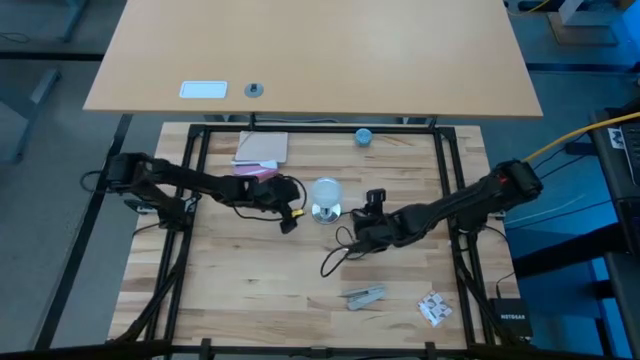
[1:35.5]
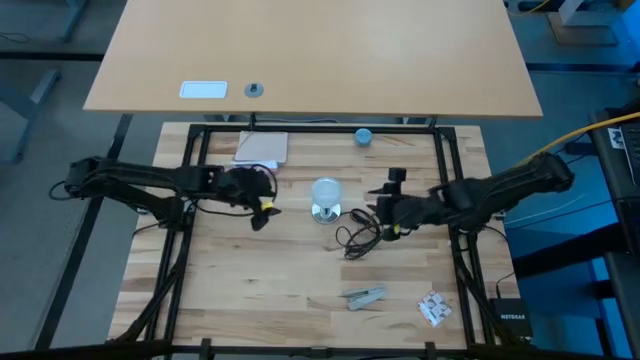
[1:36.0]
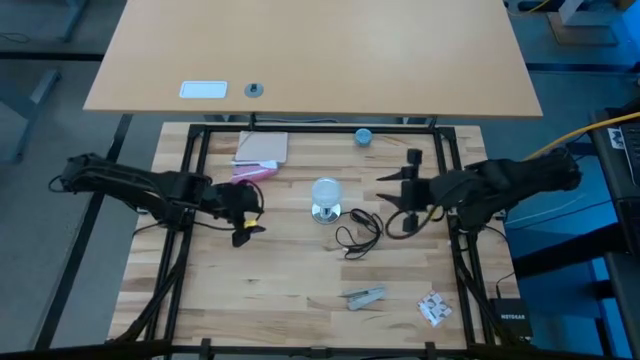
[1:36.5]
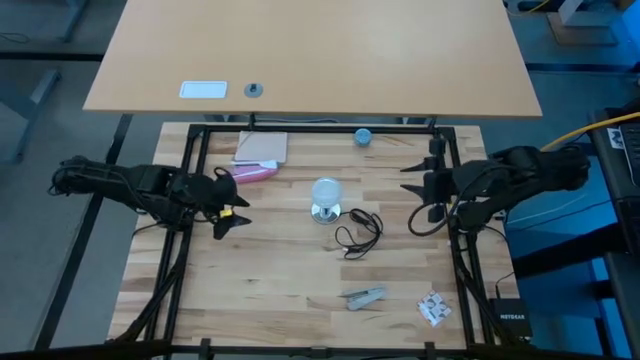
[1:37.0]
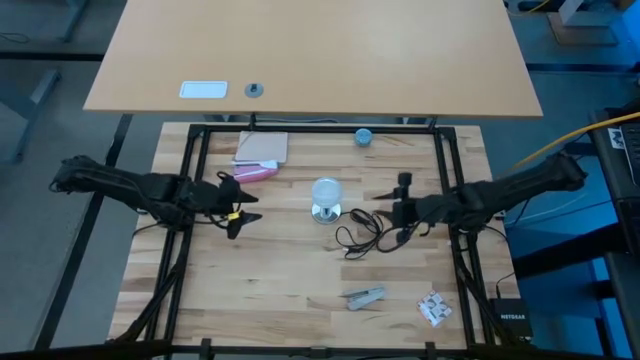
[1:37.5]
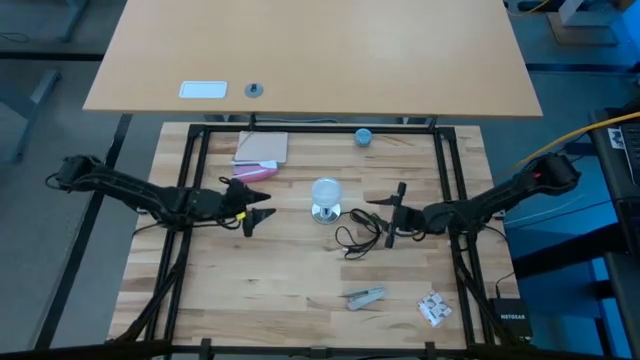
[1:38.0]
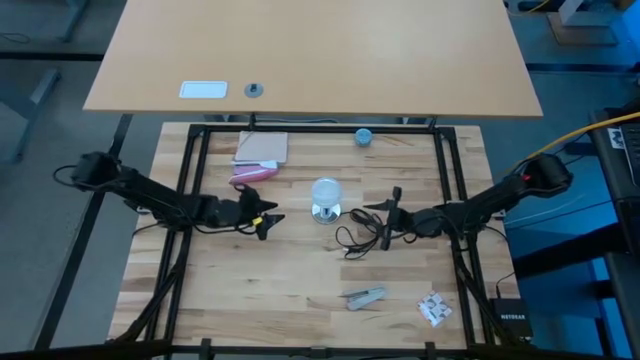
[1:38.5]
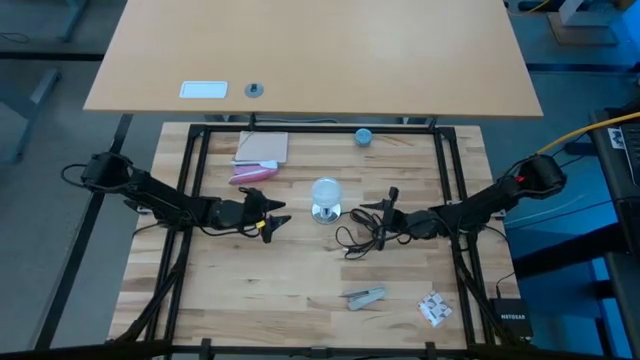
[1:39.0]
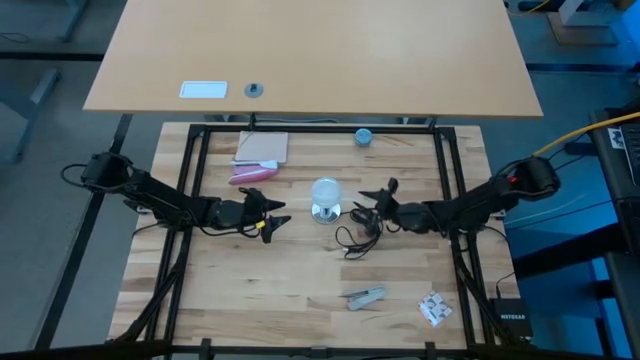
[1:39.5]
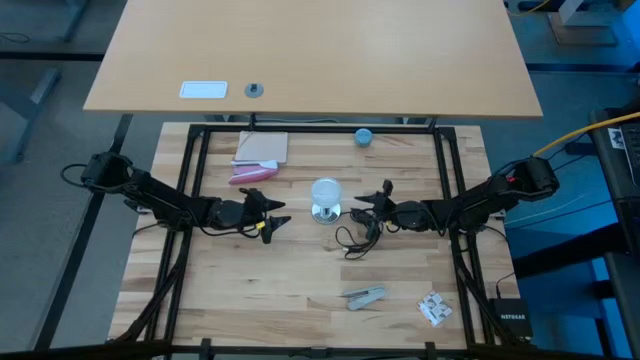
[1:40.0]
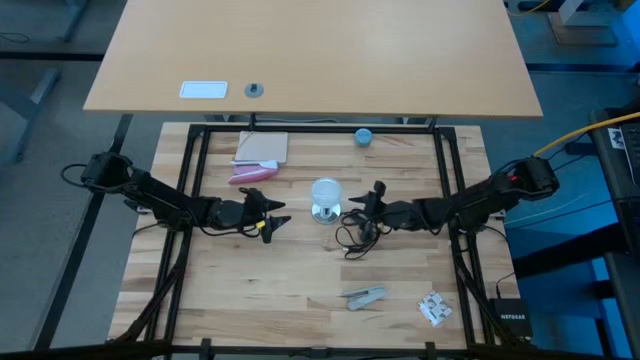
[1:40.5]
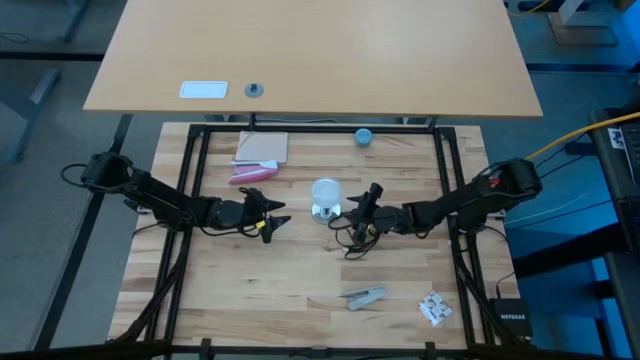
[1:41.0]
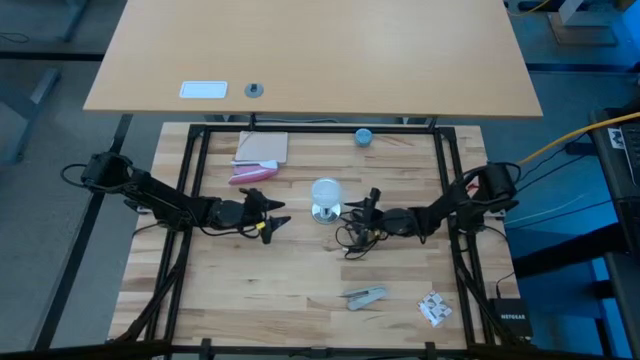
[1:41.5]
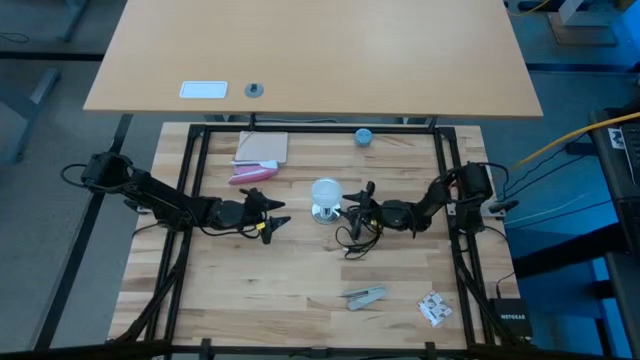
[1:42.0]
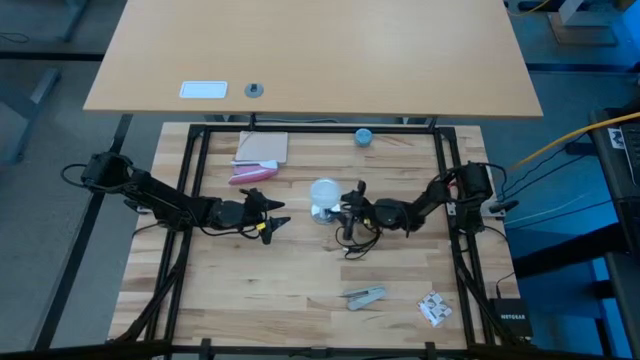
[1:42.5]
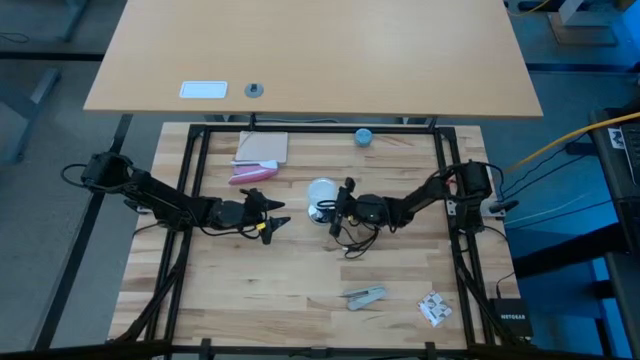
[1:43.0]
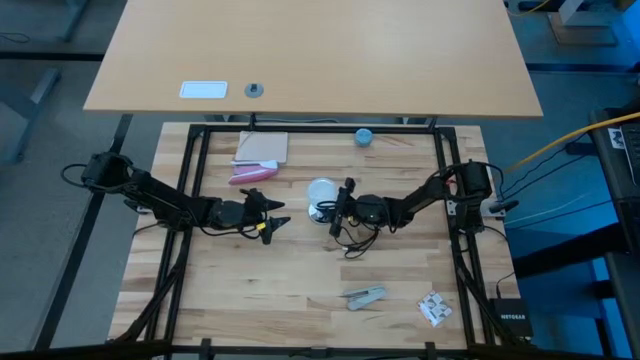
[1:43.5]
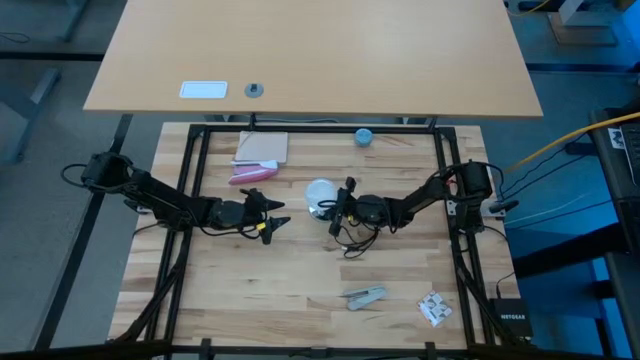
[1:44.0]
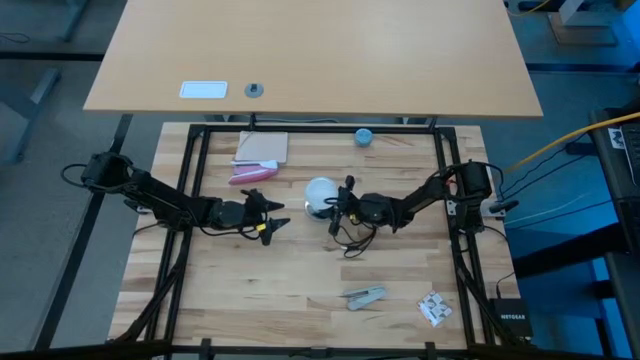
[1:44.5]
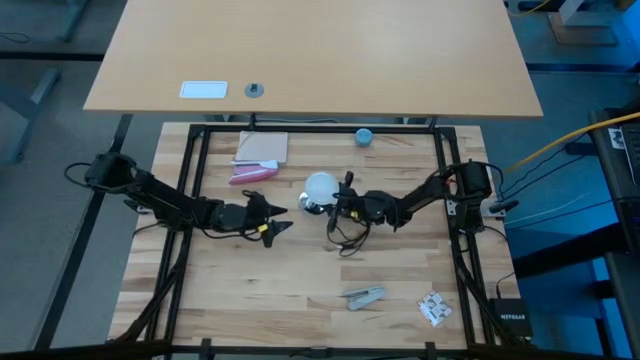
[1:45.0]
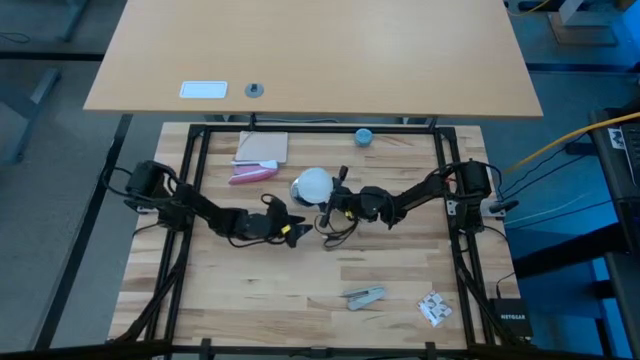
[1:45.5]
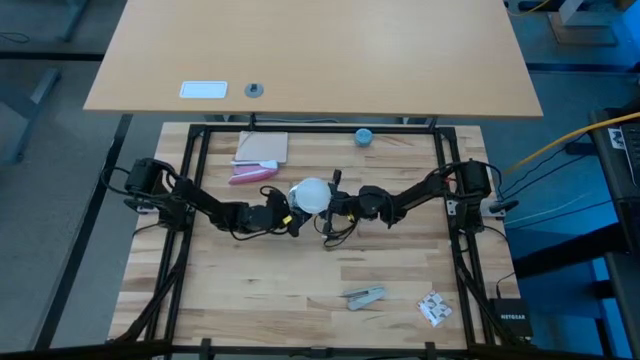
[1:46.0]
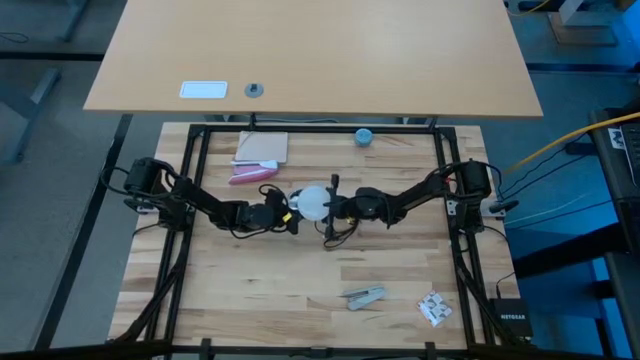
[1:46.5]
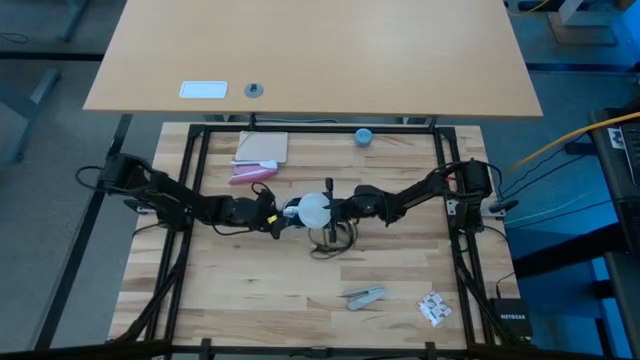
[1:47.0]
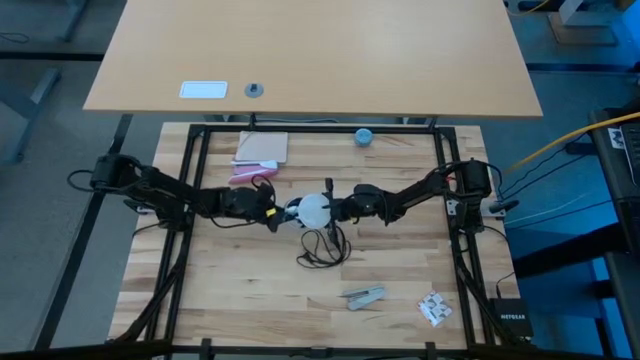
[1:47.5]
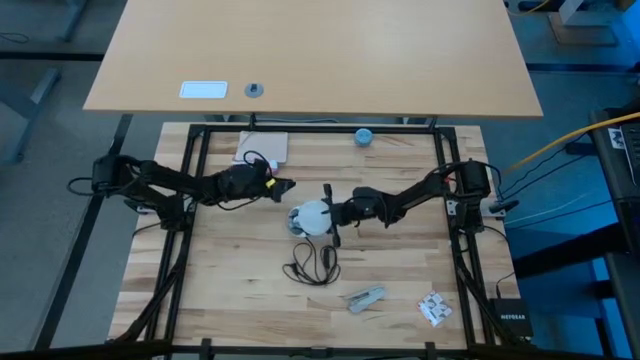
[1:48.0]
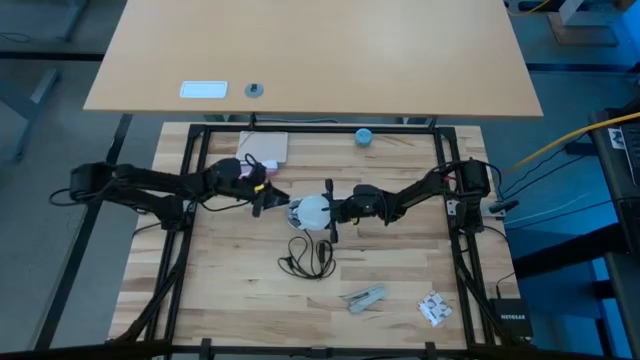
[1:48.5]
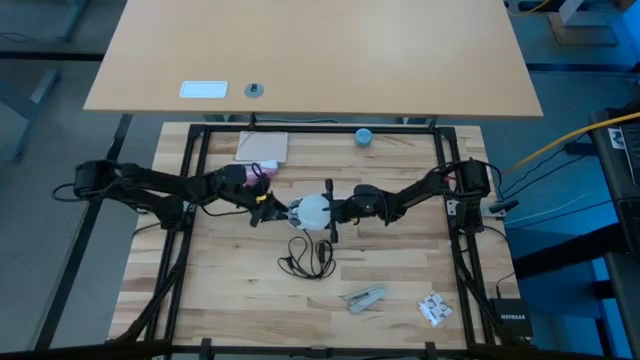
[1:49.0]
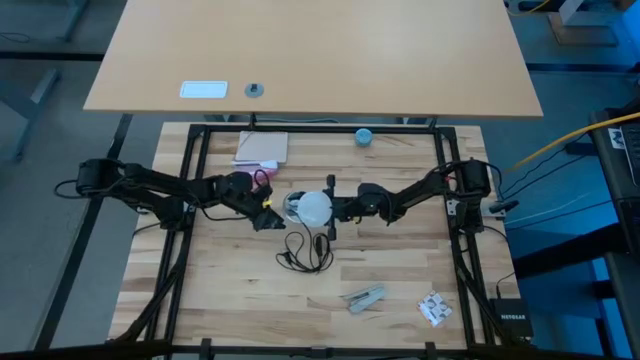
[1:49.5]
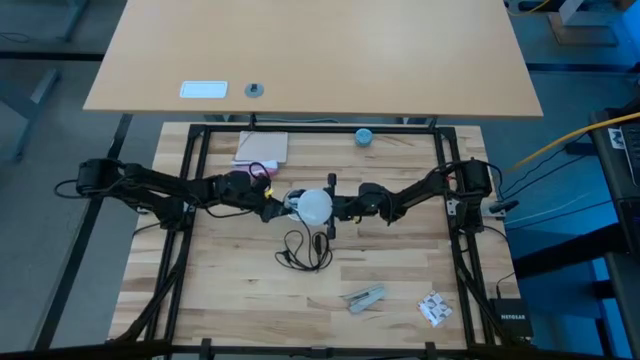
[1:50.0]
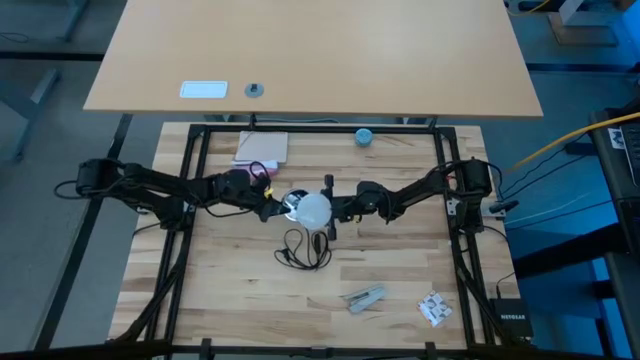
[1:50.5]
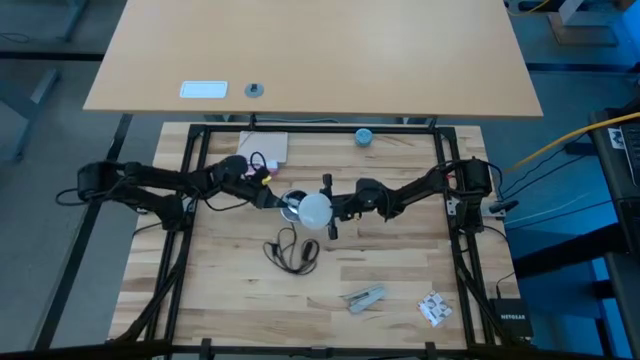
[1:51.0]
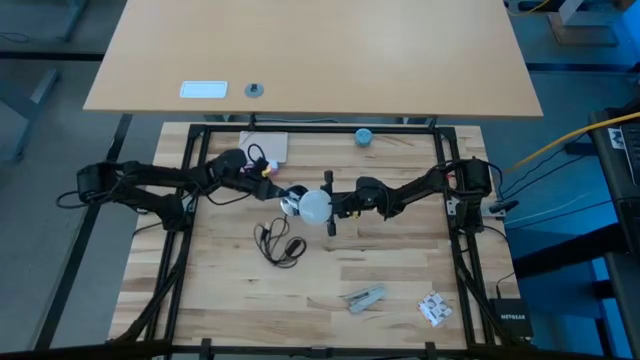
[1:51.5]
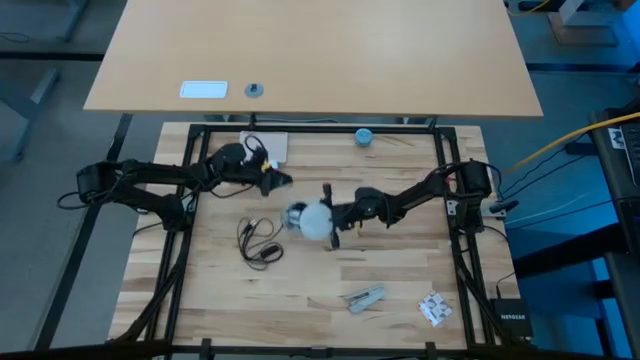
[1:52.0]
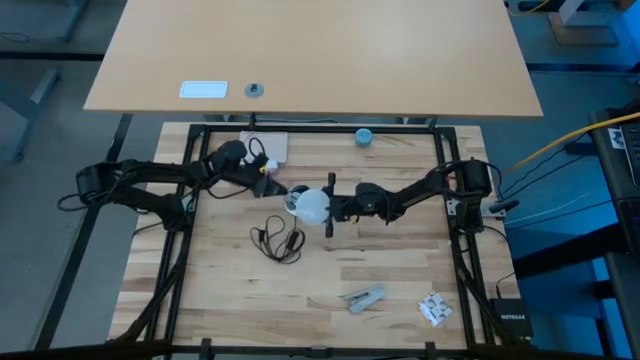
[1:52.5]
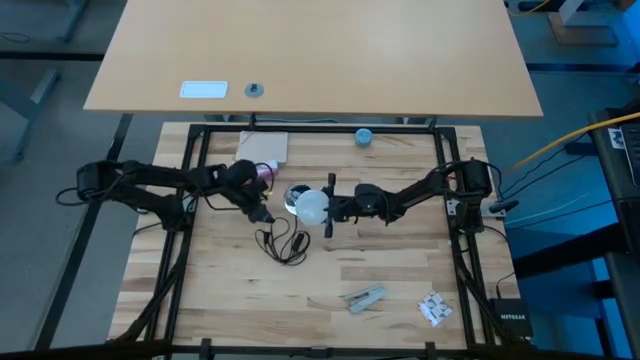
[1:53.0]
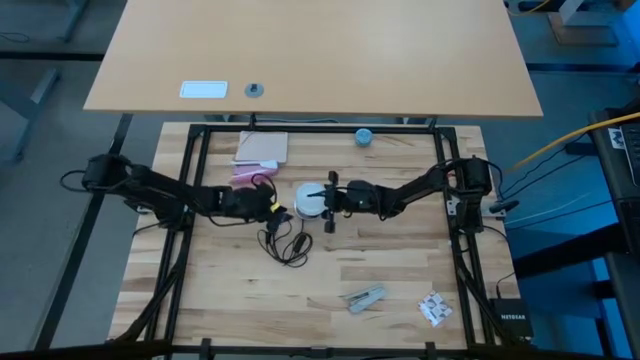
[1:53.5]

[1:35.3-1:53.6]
Task: Screw lightbulb
Remove the lightbulb from the lamp

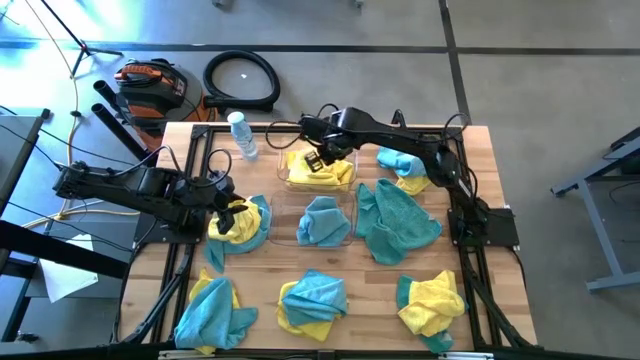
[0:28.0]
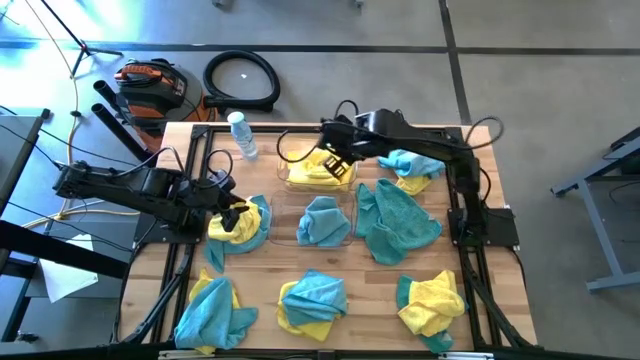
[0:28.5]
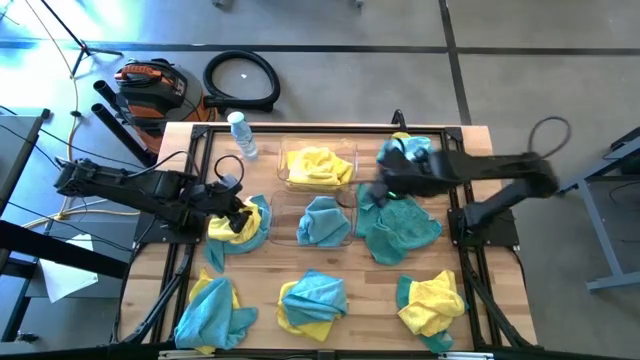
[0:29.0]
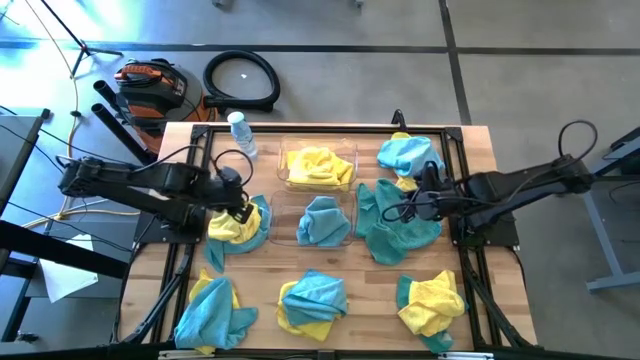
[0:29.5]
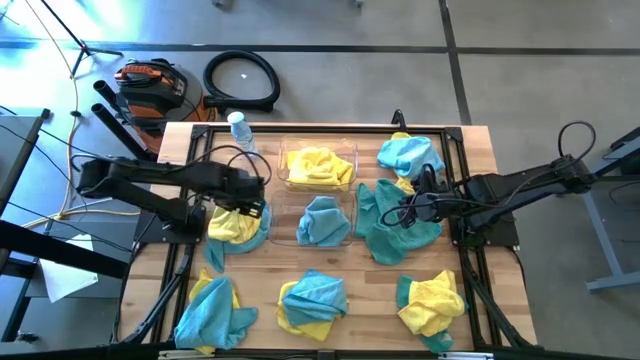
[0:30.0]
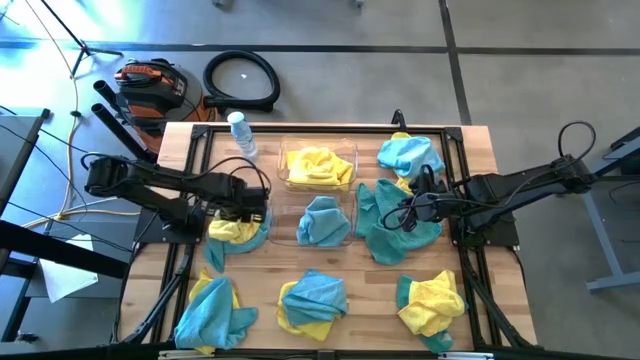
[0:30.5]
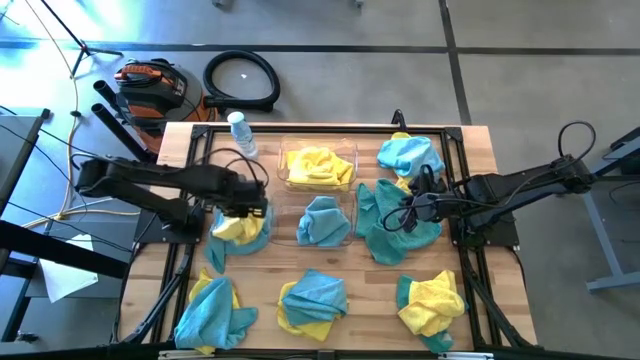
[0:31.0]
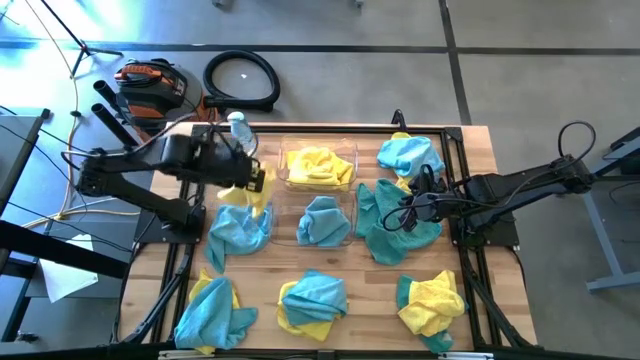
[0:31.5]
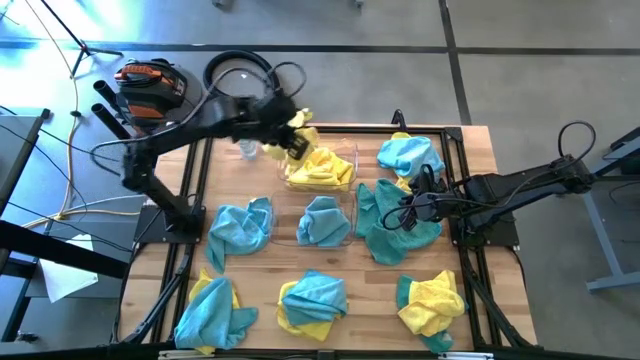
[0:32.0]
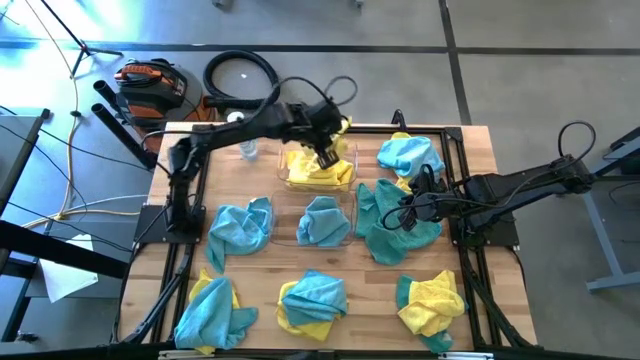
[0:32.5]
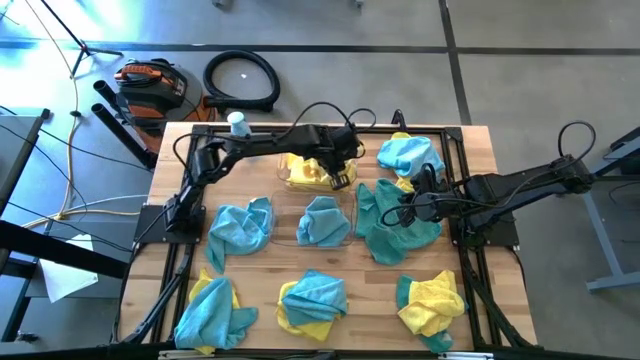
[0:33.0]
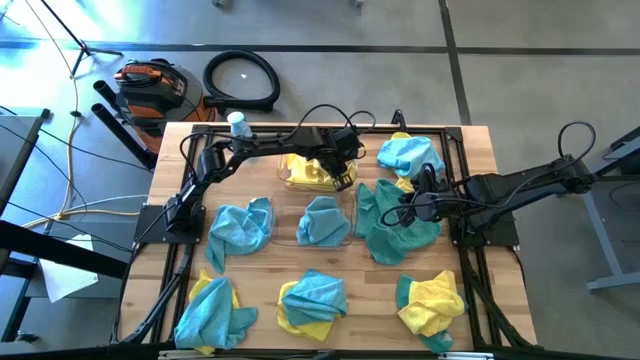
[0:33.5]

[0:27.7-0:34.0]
Task: Sort microfiber towel by color & place in baskets
Put the yellow microfiber cloth into the top transparent bin
